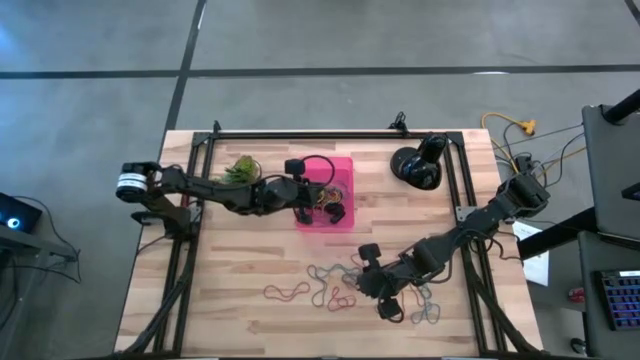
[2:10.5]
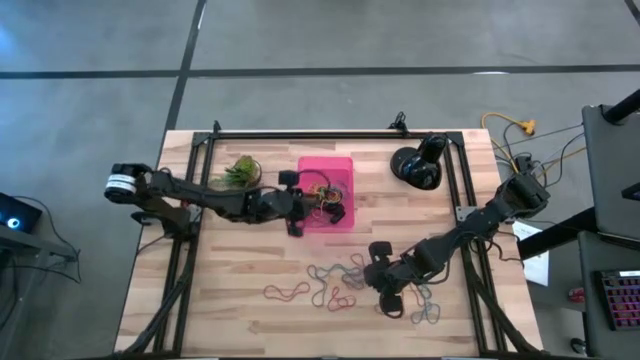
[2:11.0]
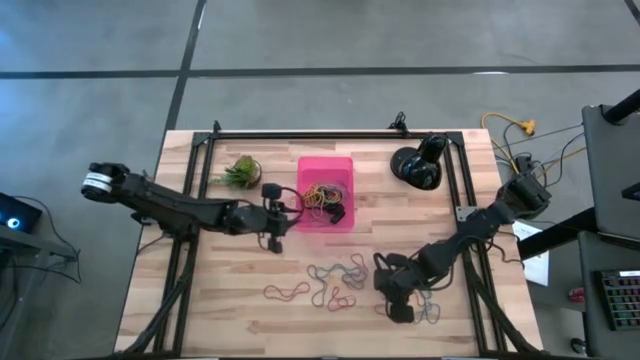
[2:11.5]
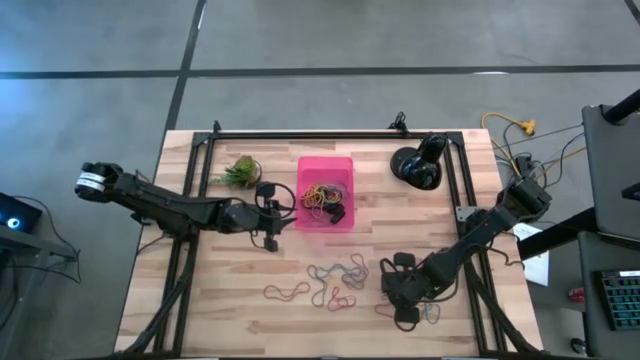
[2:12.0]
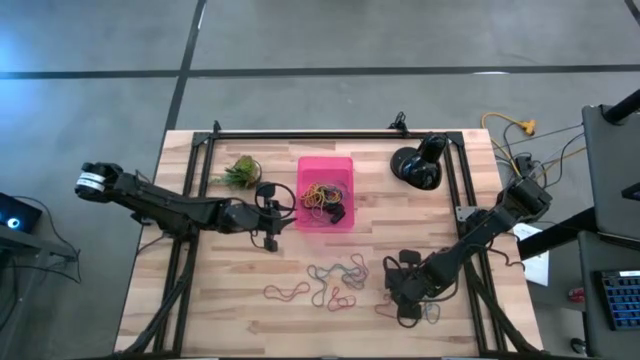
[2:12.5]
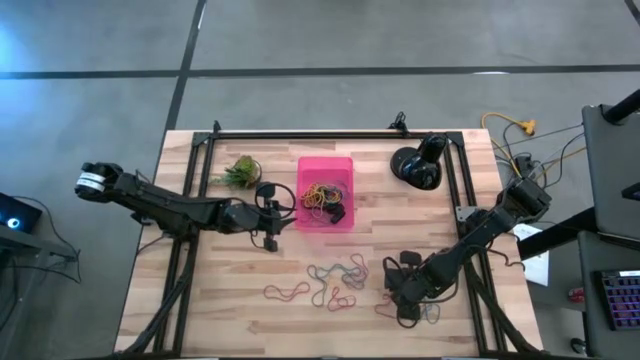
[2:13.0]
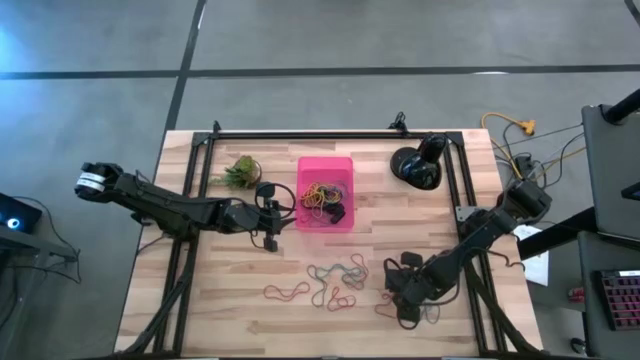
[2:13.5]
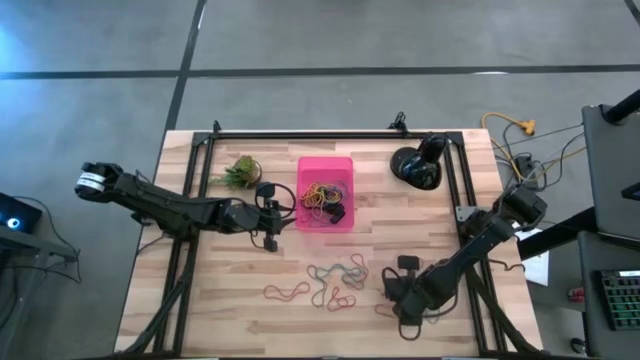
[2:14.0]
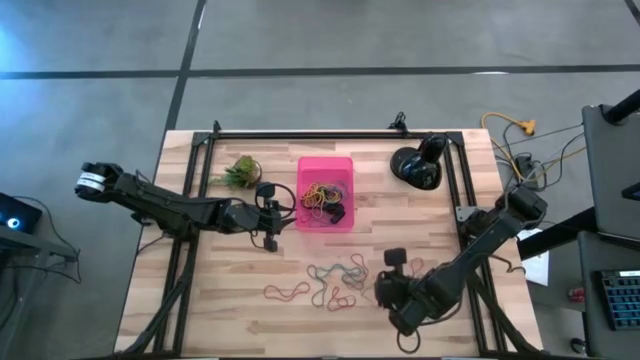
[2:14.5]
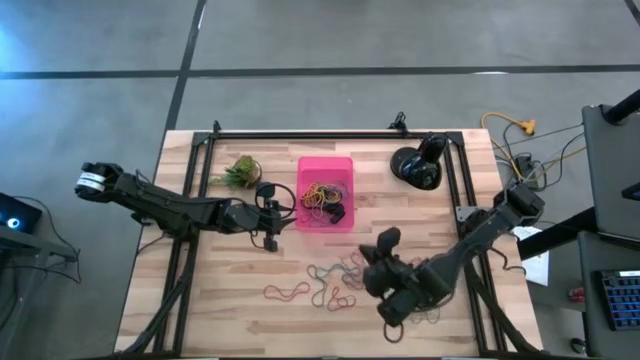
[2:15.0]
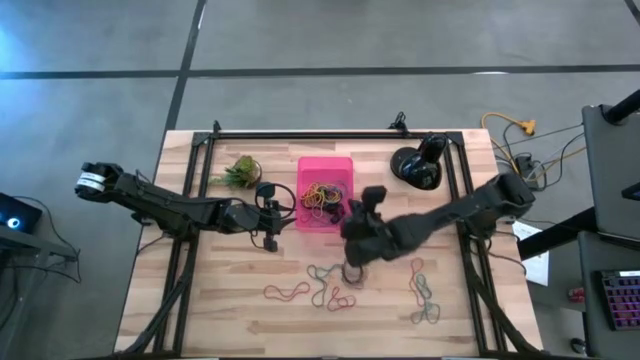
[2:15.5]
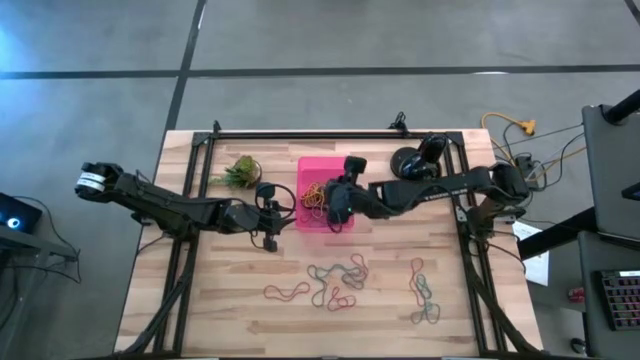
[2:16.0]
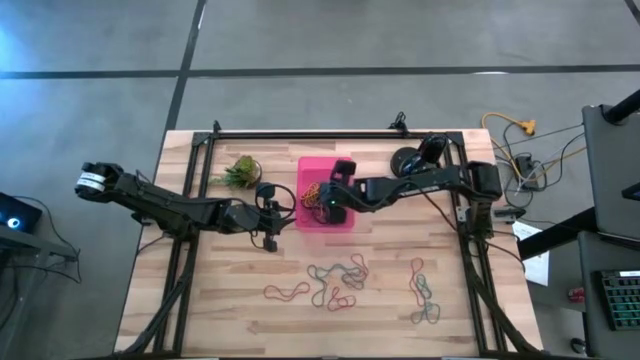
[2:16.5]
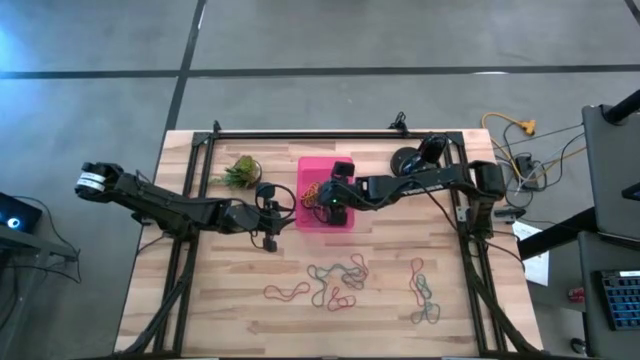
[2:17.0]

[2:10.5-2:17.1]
Task: Pick and place rubber bands into bin
Put the red rubber bands into the pink bin

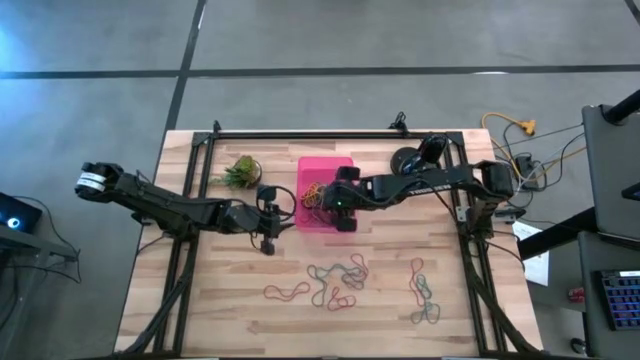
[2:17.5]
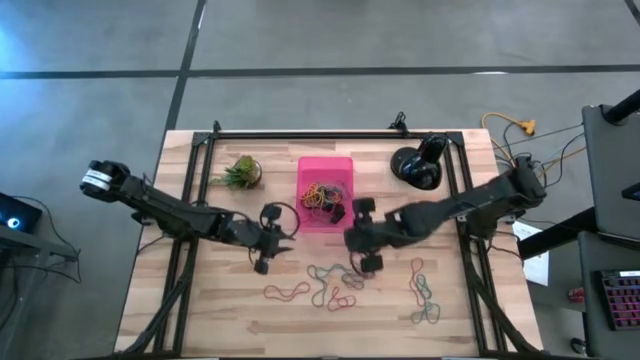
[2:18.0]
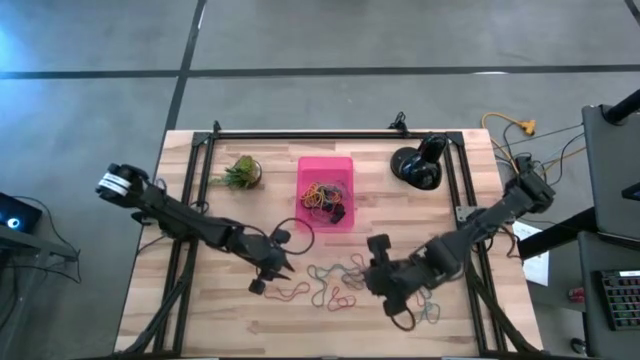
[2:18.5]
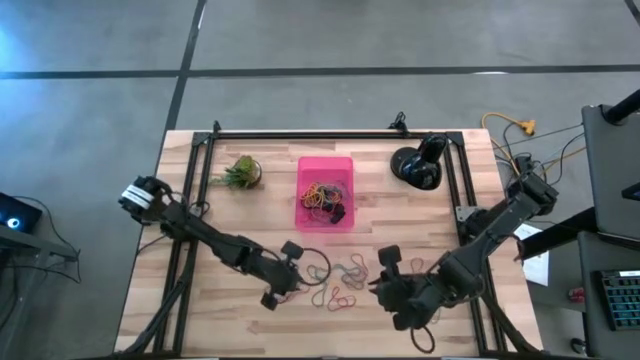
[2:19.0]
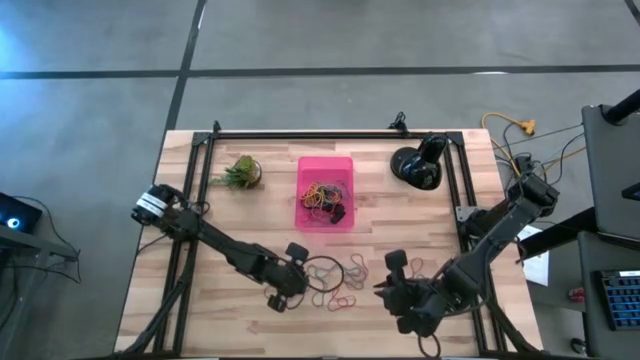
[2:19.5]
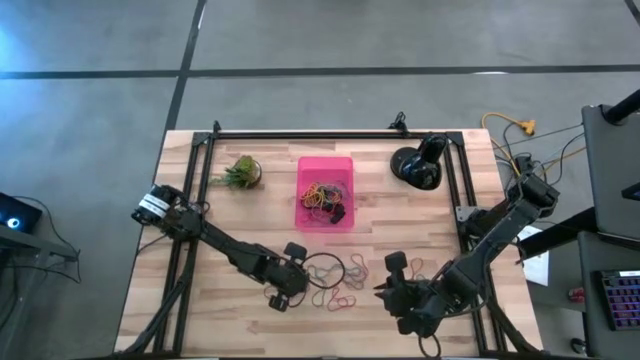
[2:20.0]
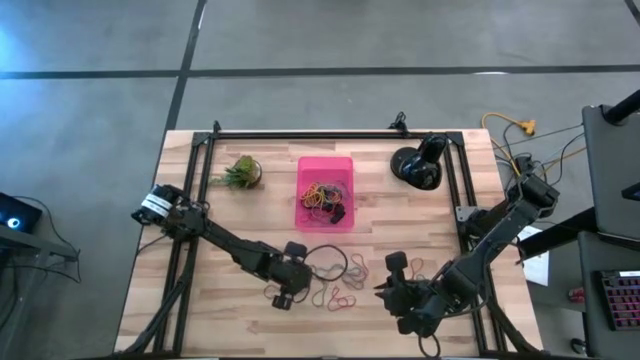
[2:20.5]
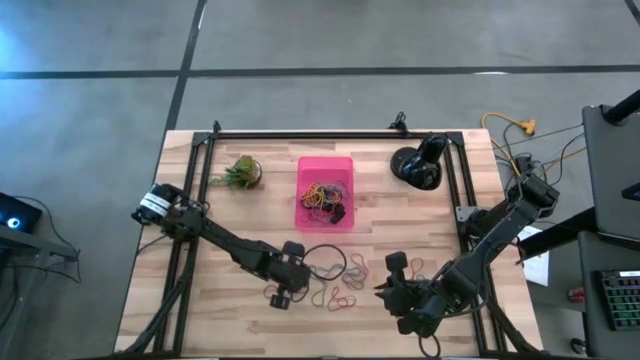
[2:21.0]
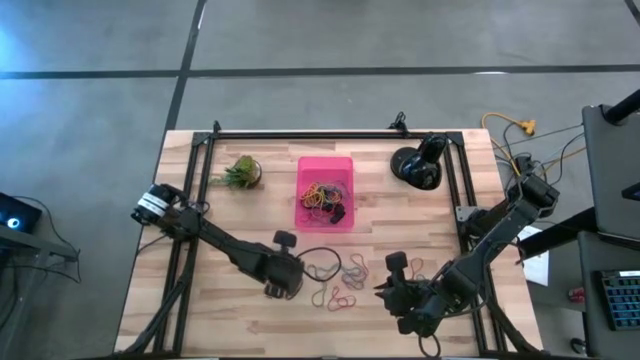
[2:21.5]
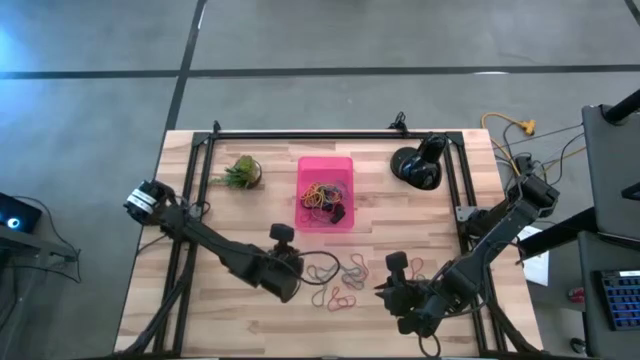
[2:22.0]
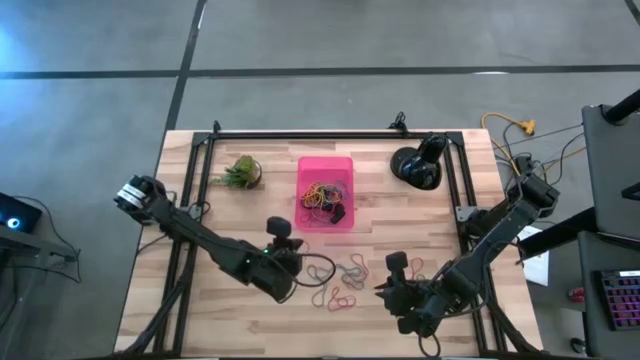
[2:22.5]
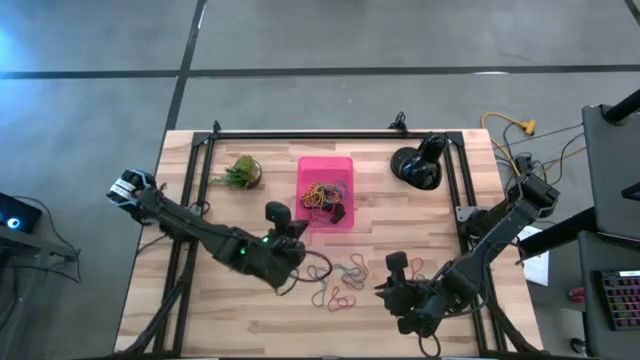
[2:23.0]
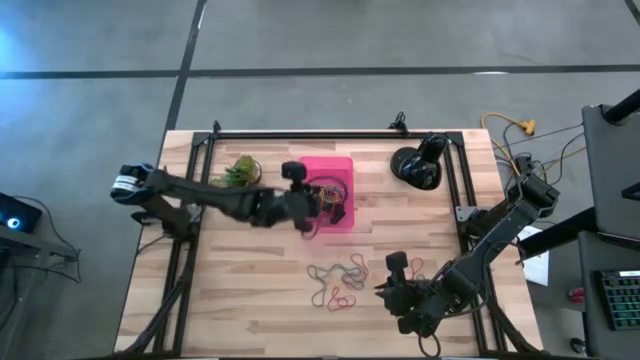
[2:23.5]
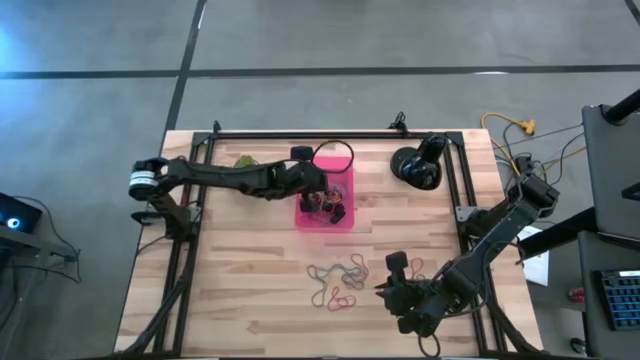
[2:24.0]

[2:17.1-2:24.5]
Put the red rubber bands into the pink bin

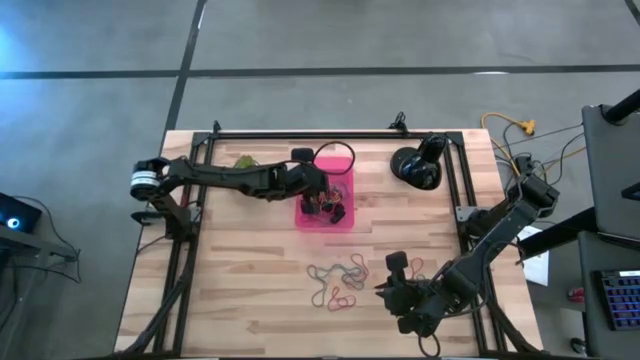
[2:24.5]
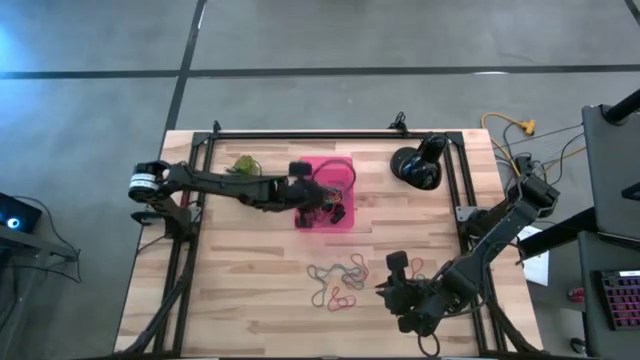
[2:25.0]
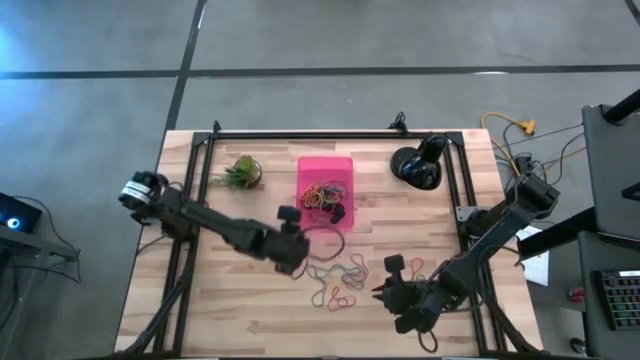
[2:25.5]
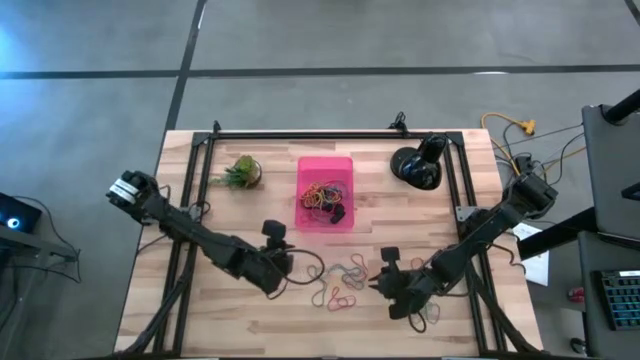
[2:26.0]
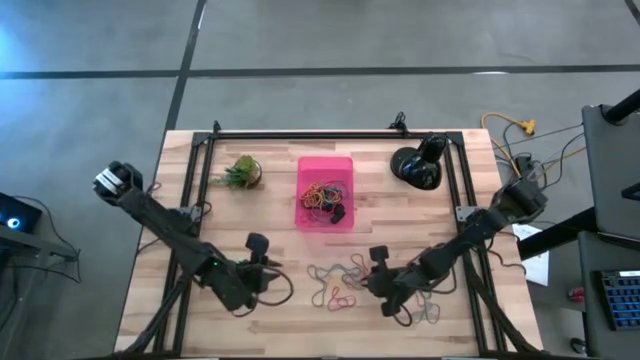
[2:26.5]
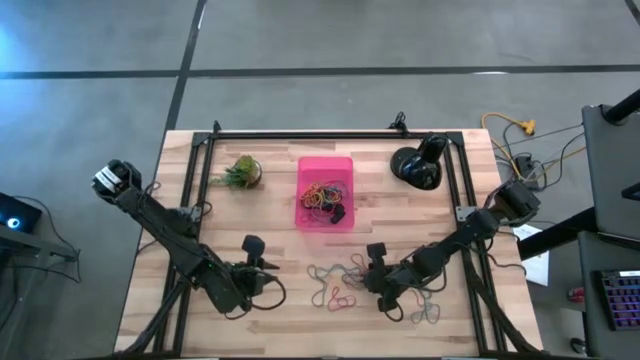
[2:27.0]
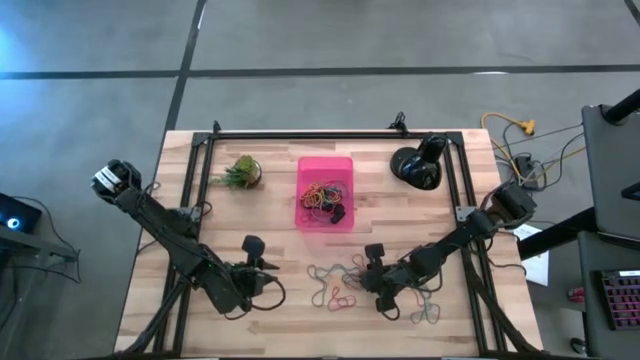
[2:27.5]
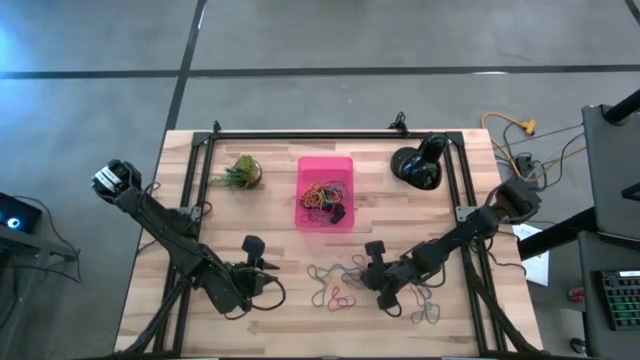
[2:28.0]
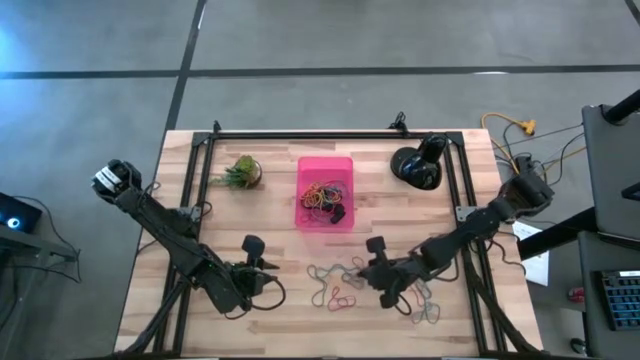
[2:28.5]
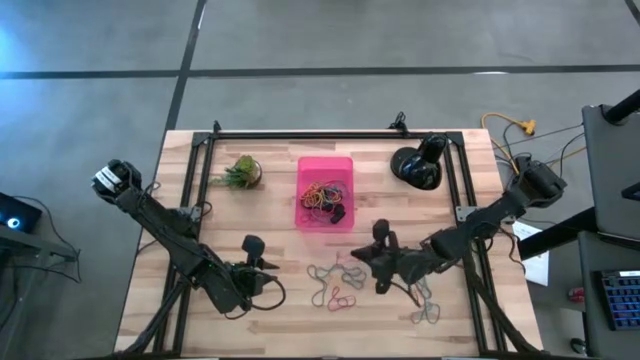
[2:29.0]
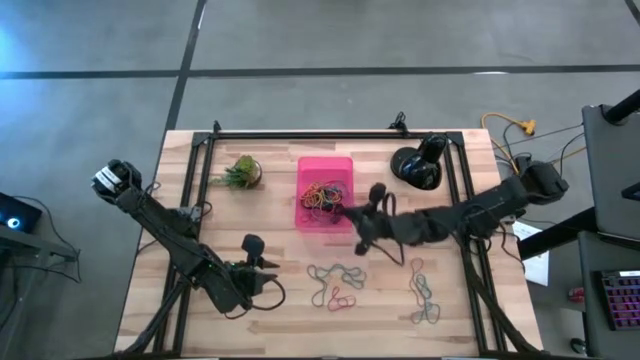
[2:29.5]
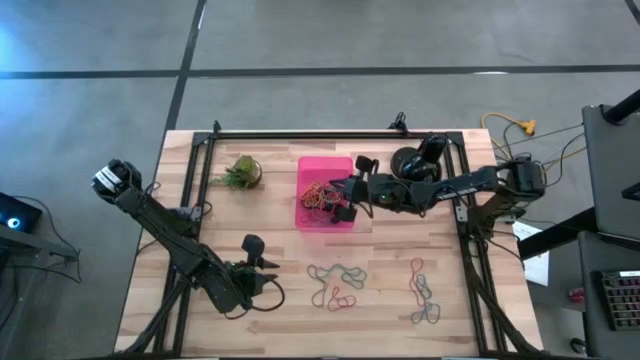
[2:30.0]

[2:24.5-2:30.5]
Put the red rubber bands into the pink bin
